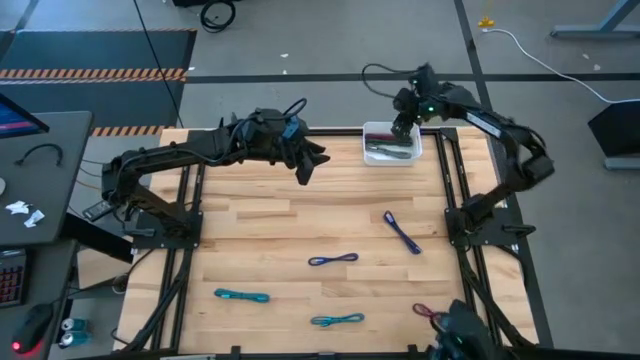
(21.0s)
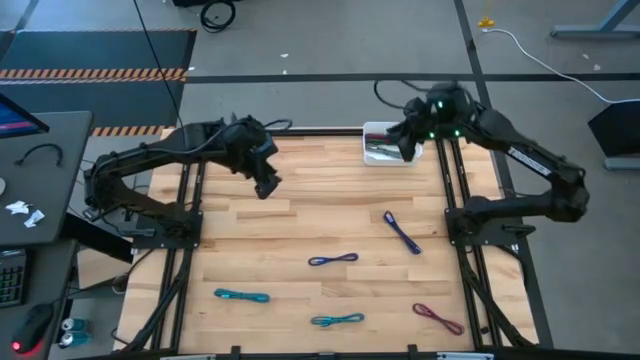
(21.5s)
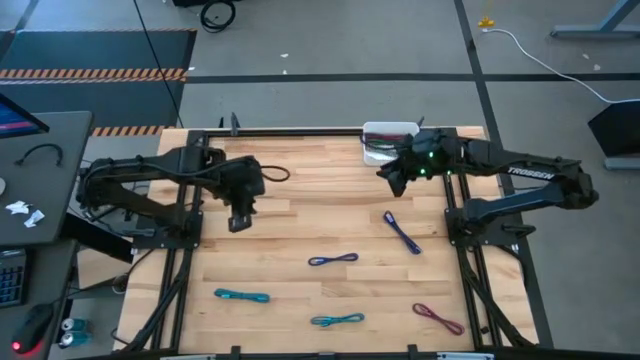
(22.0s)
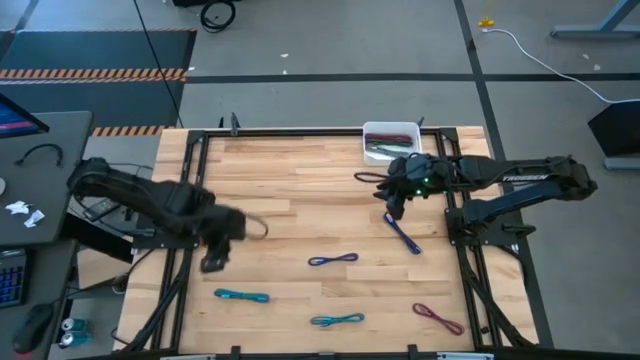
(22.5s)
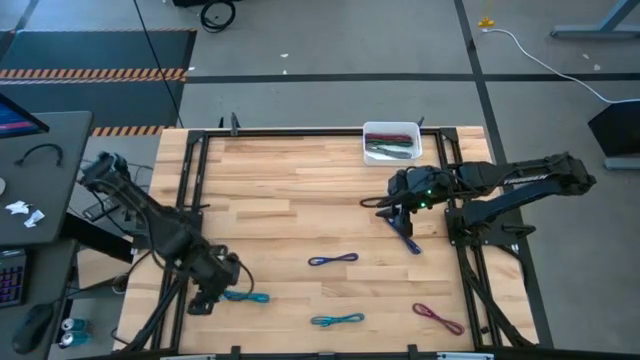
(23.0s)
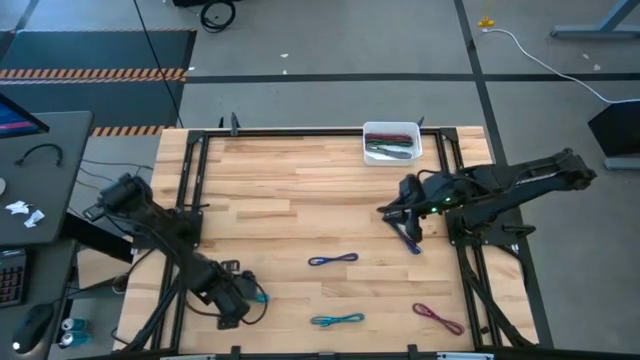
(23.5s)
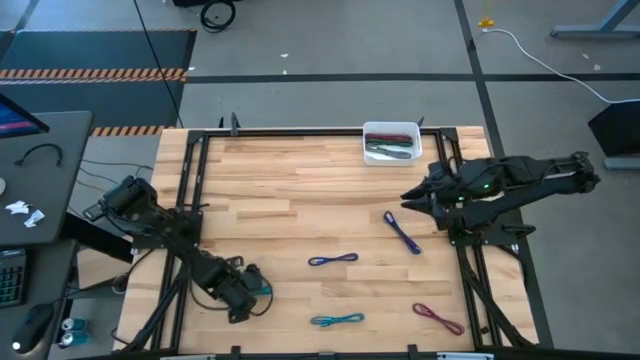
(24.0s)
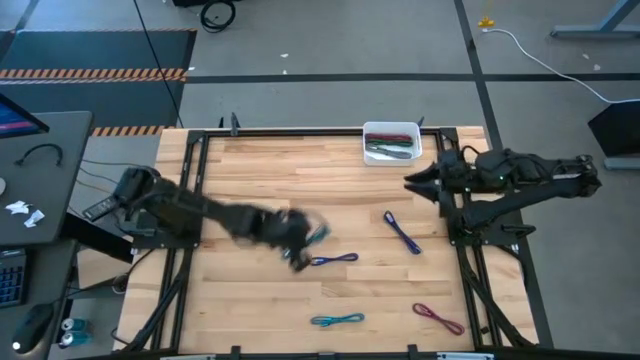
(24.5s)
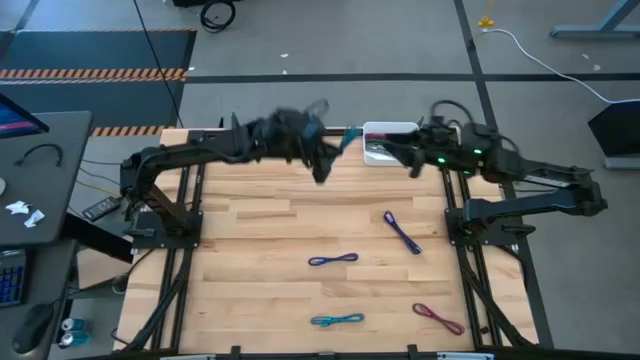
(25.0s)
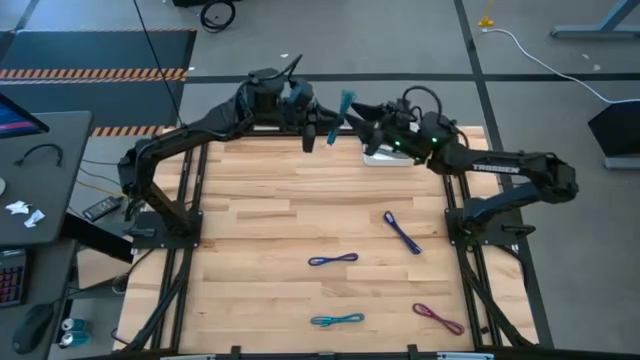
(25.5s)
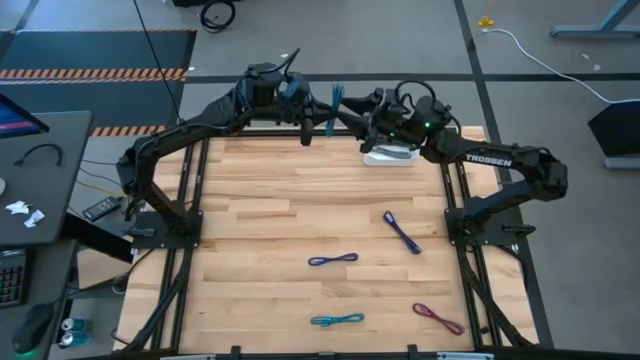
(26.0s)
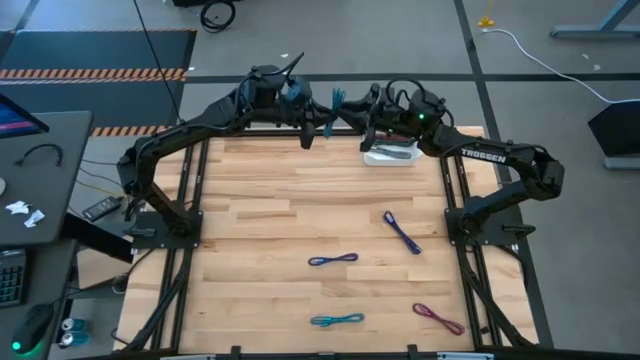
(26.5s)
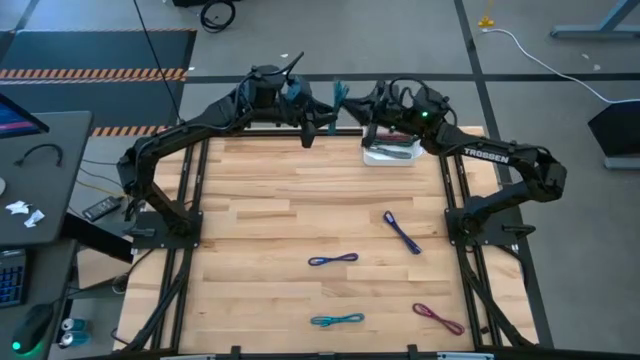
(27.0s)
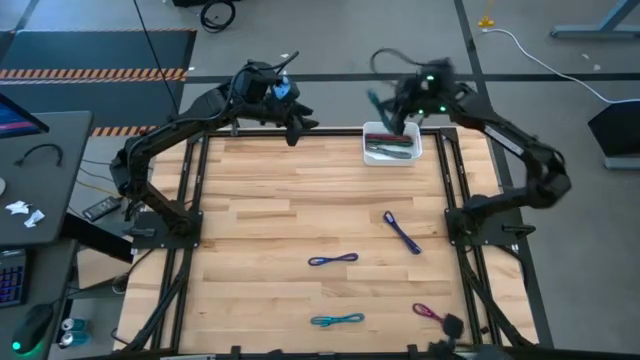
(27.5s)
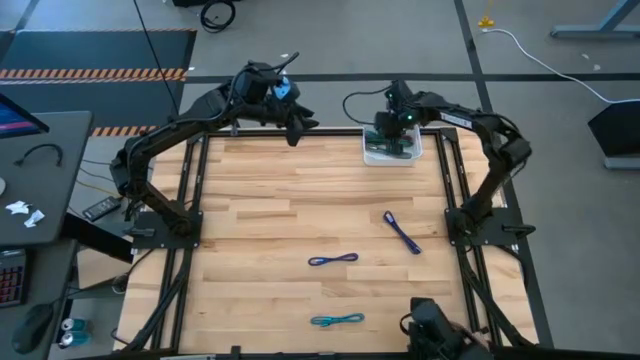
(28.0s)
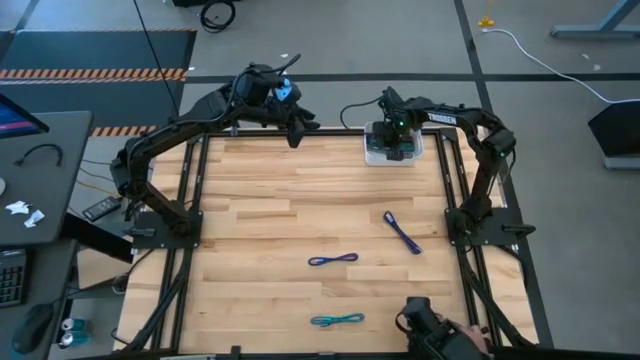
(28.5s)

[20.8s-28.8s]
Task: Pick and place USB-C Cables
Put the left light blue charger cable into the bin

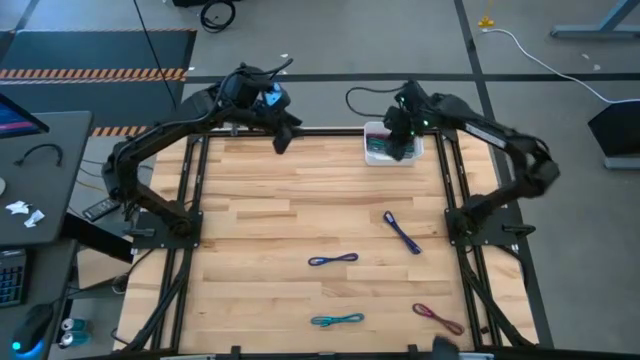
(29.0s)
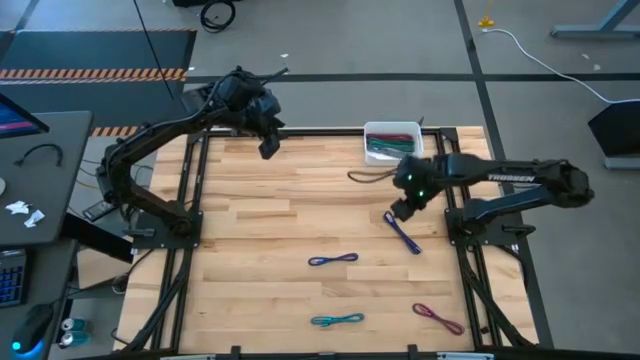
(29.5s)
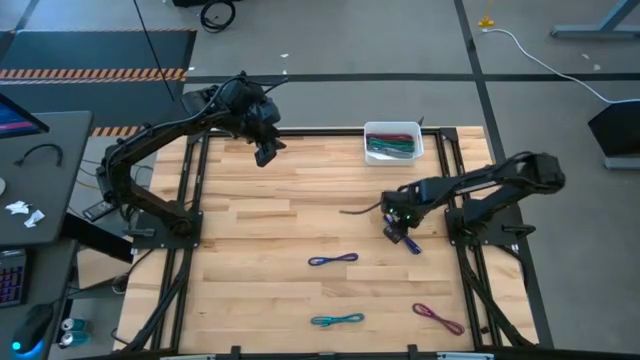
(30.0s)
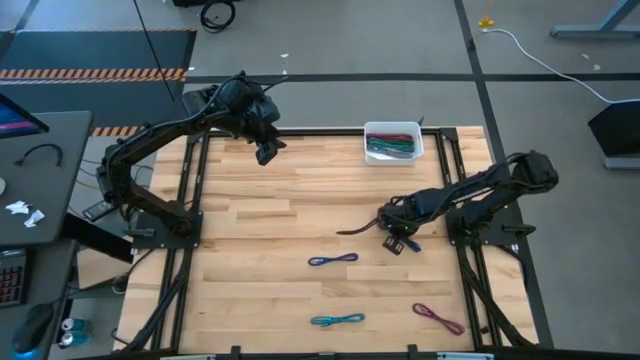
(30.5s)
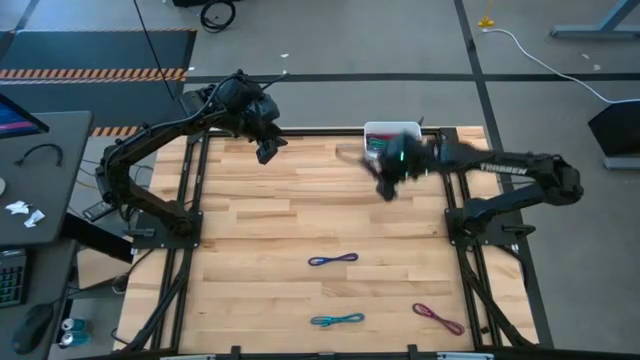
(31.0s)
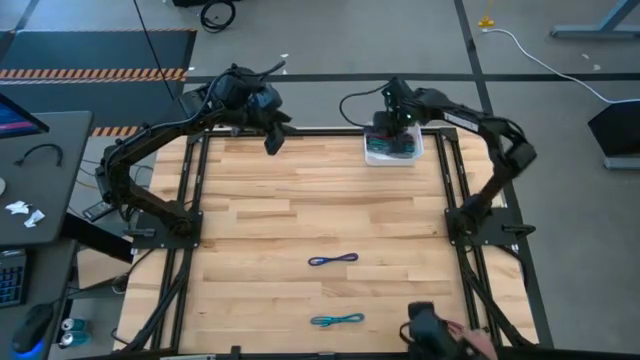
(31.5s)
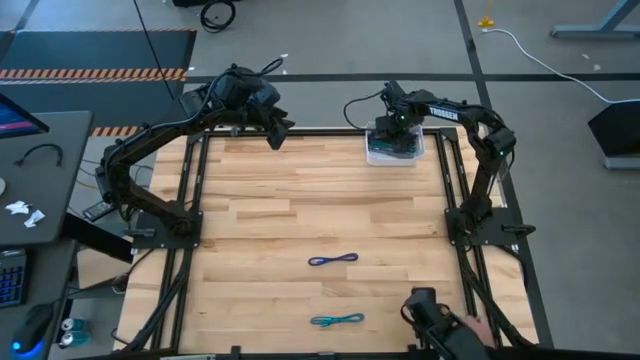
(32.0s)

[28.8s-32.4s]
Put the right dark blue charger cable into the bin

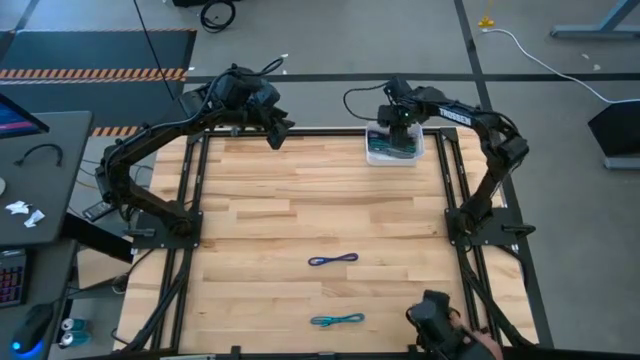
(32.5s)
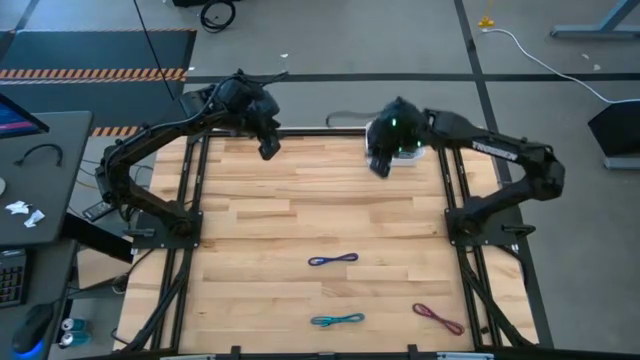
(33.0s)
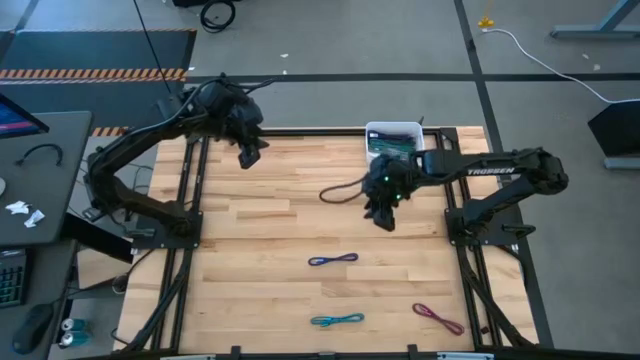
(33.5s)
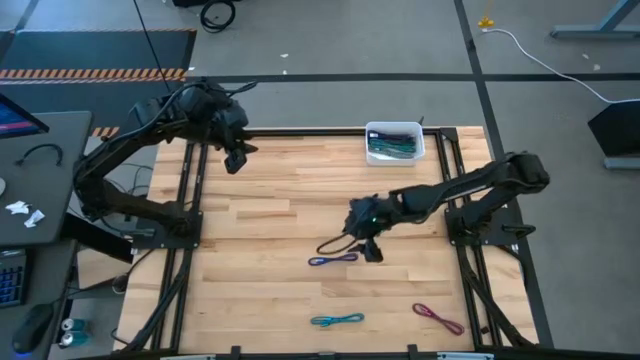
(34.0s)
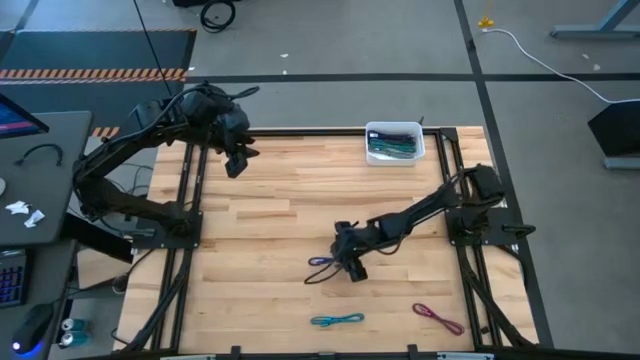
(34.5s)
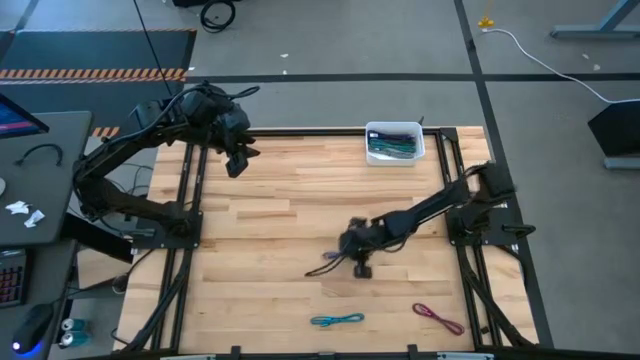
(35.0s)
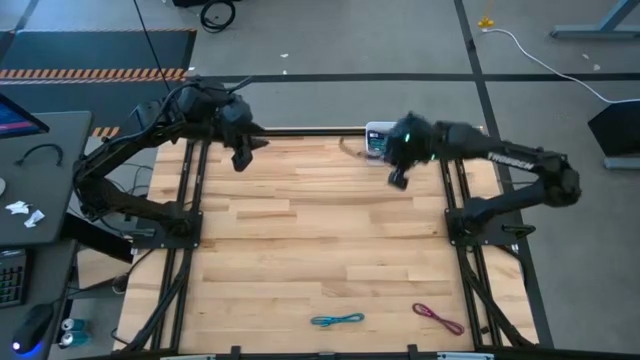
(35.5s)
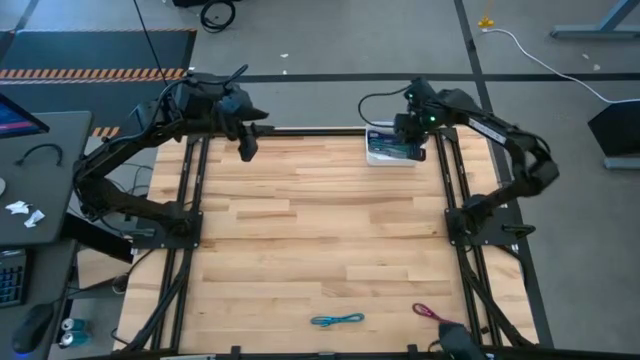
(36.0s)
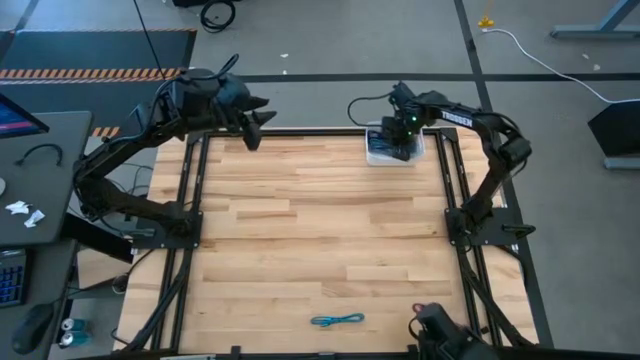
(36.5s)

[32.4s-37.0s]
Put the dark blue charger cable into the bin

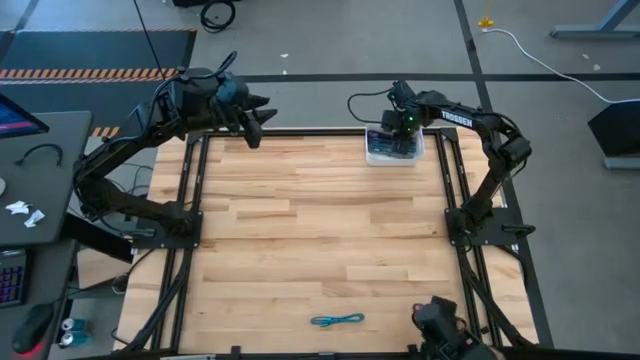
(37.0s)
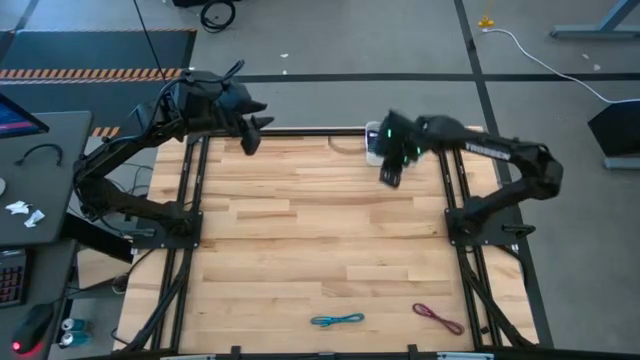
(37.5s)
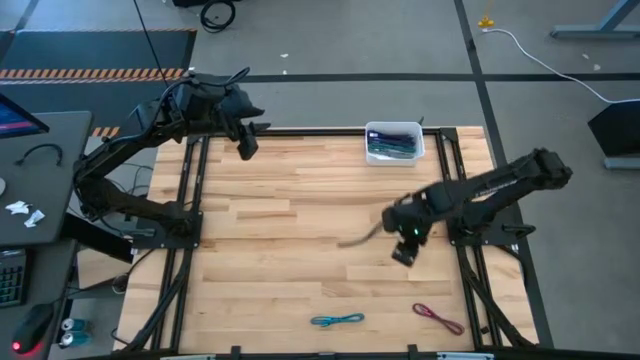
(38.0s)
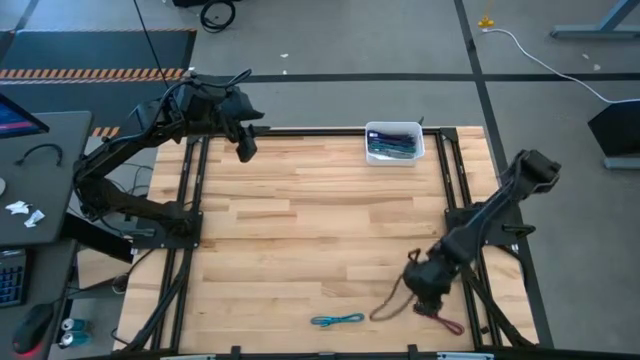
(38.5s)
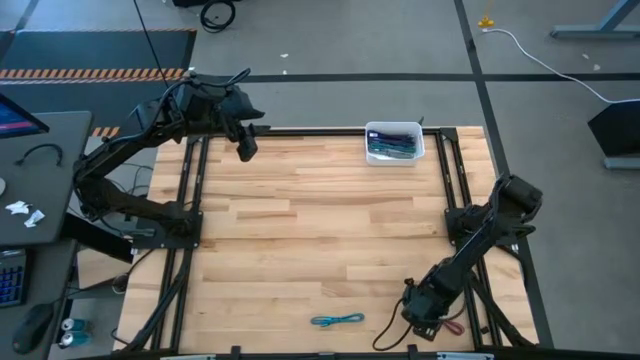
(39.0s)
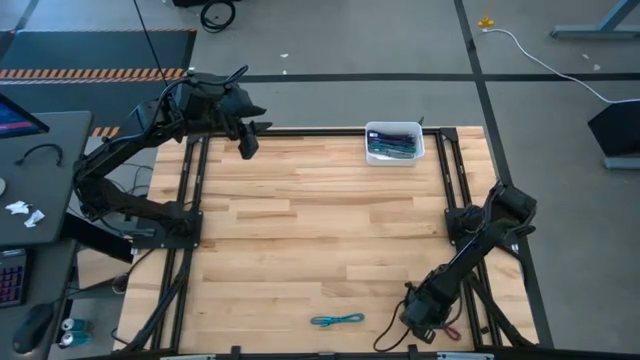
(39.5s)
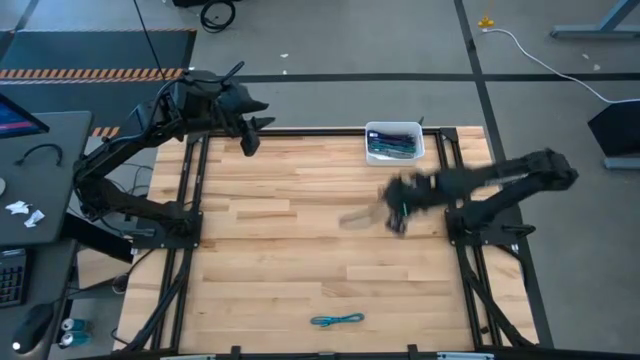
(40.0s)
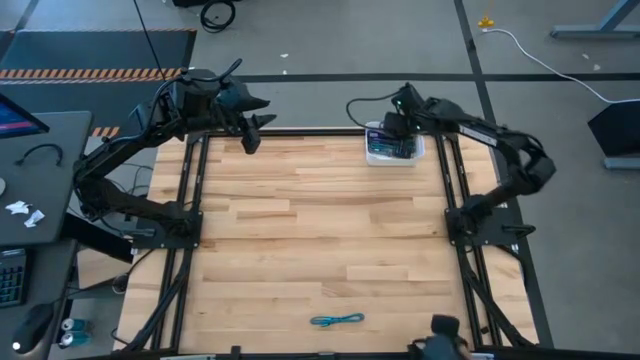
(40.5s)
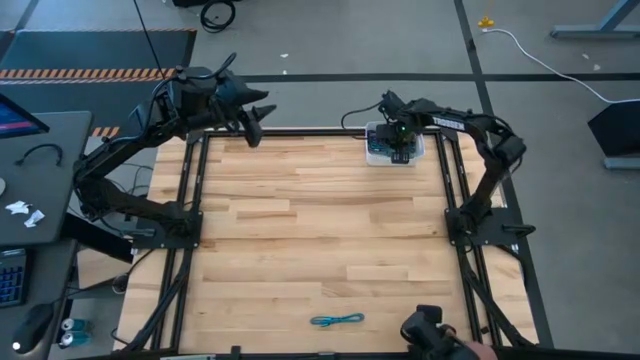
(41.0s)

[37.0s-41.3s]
Put the pink charger cable into the bin

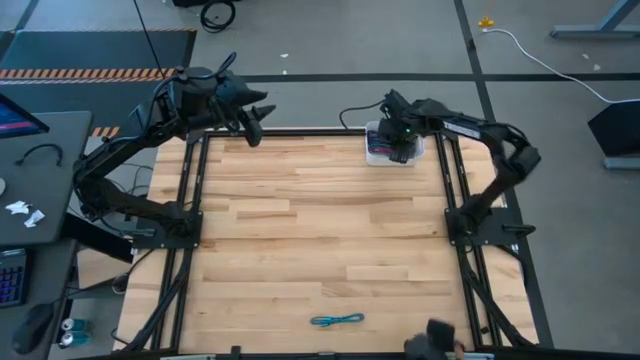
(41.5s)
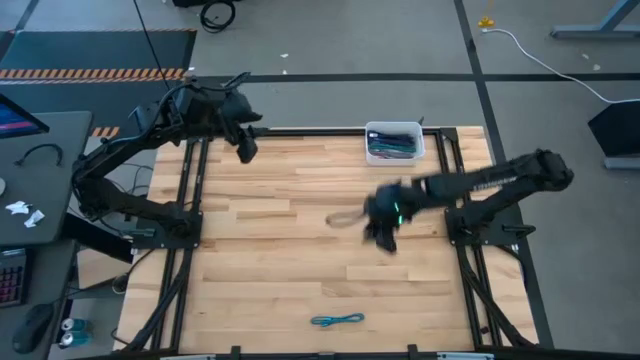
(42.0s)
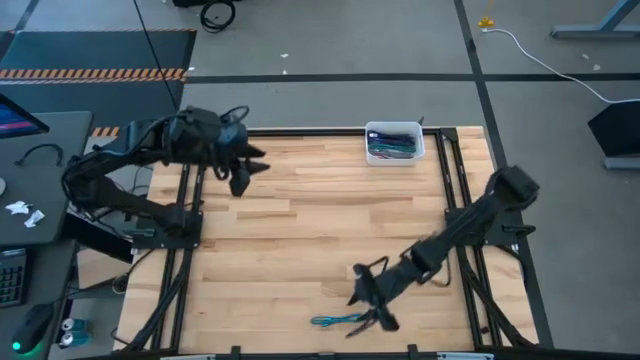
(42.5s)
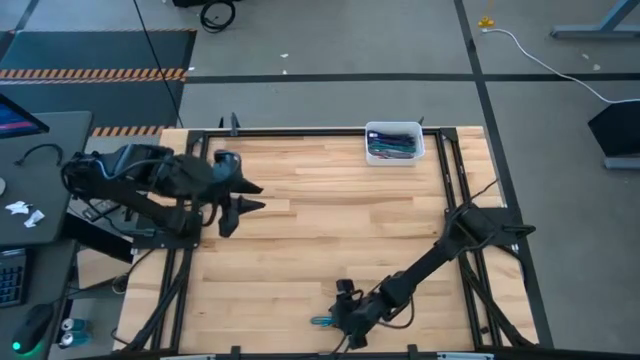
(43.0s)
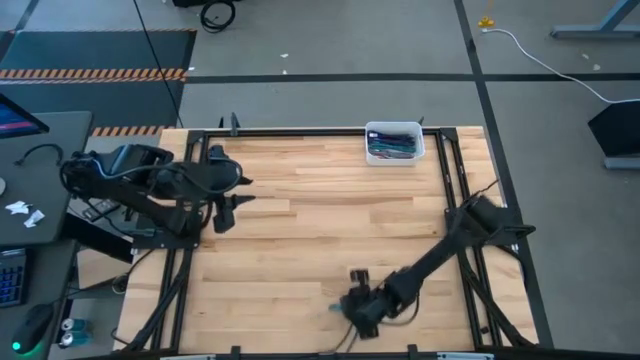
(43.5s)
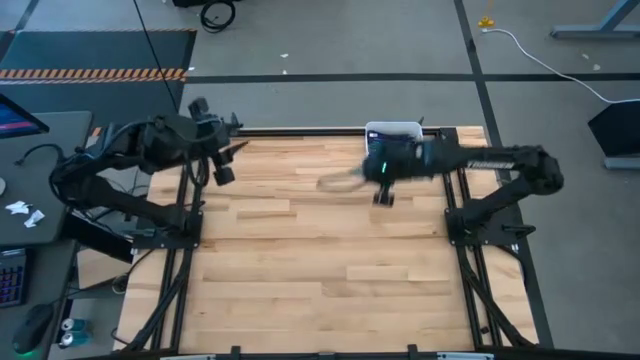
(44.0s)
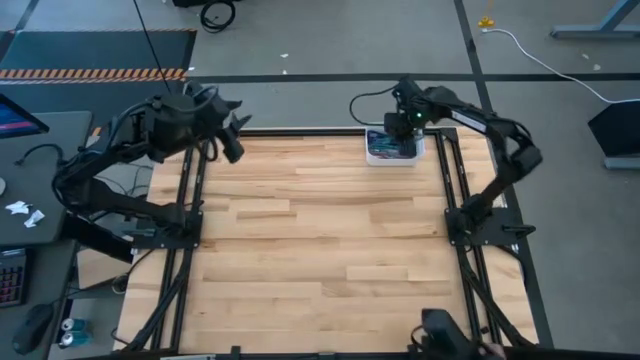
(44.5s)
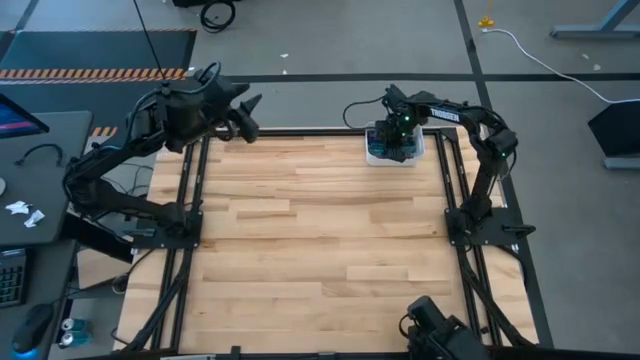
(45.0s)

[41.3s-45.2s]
Put the light blue charger cable into the bin
